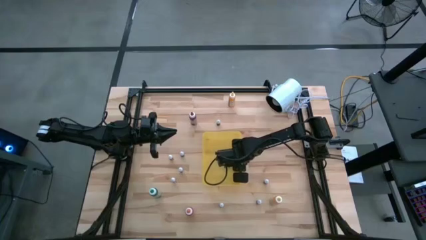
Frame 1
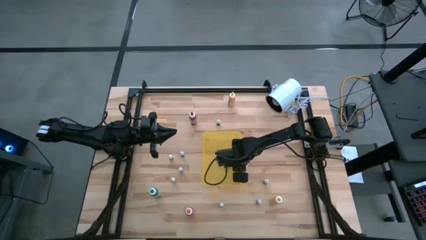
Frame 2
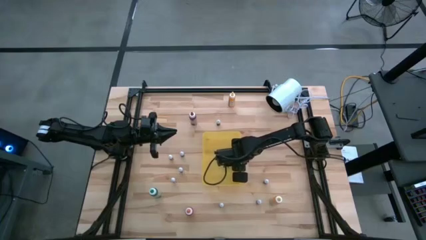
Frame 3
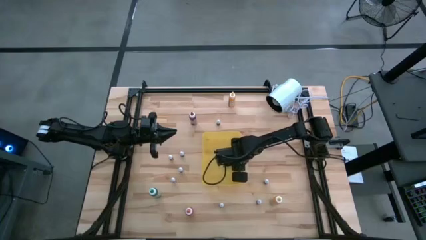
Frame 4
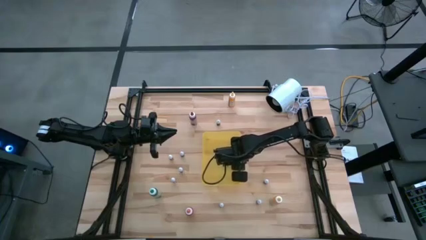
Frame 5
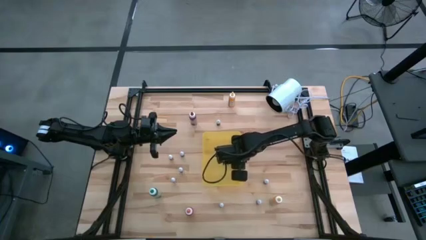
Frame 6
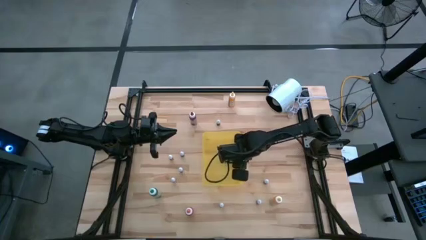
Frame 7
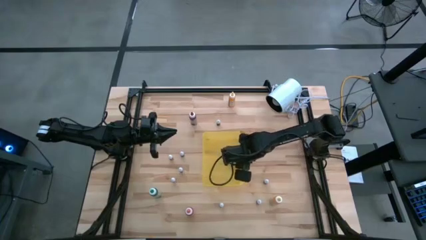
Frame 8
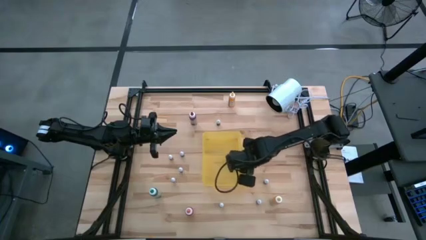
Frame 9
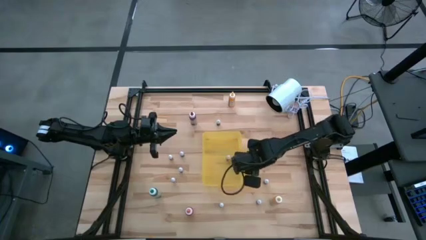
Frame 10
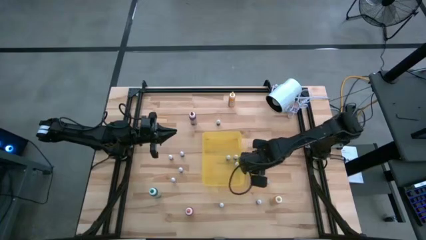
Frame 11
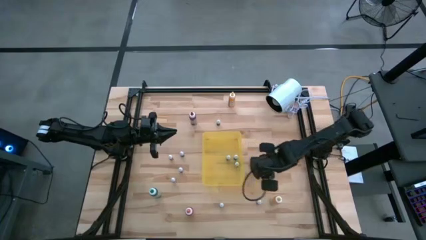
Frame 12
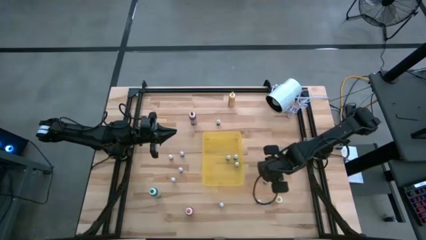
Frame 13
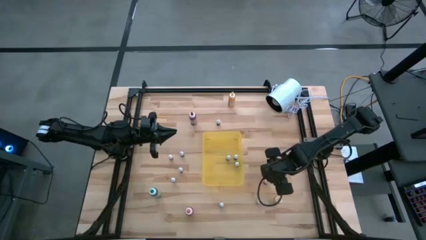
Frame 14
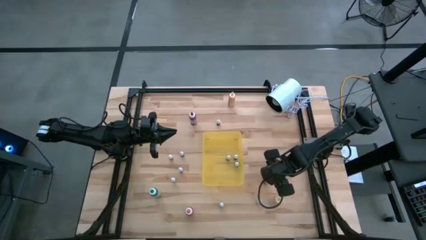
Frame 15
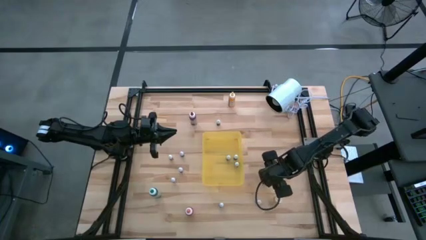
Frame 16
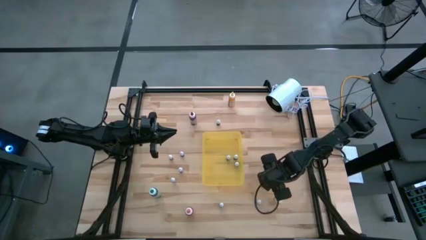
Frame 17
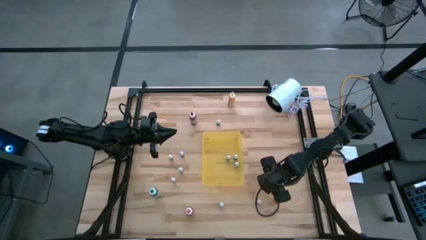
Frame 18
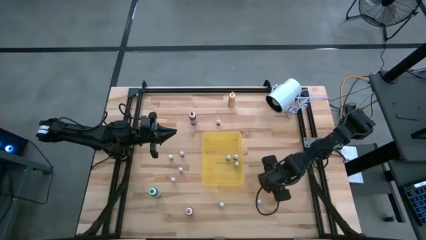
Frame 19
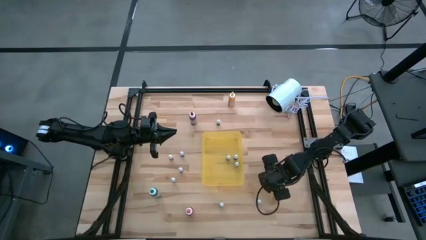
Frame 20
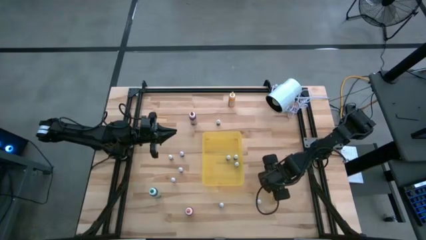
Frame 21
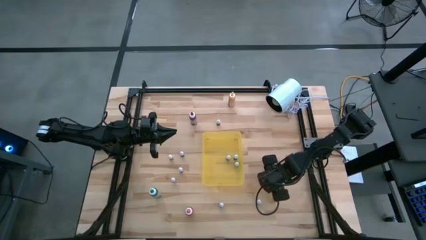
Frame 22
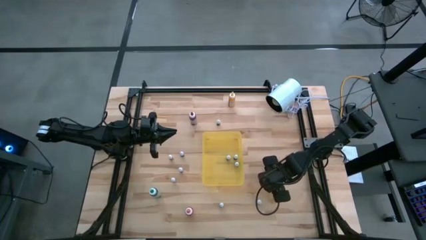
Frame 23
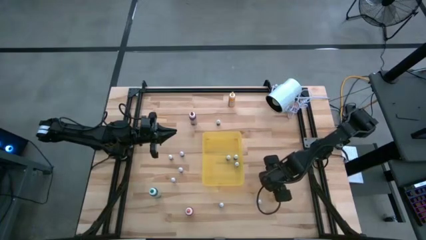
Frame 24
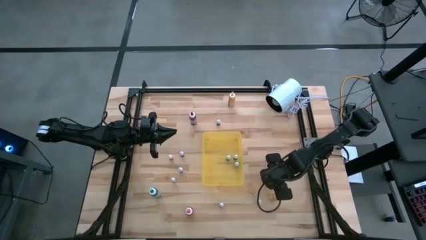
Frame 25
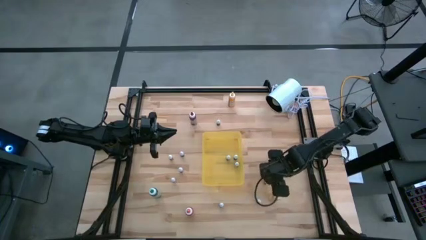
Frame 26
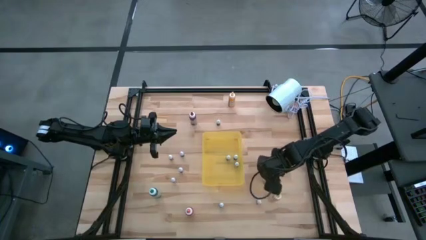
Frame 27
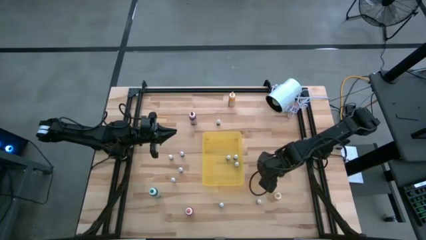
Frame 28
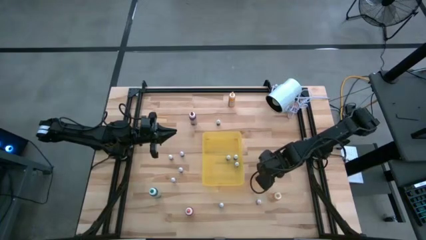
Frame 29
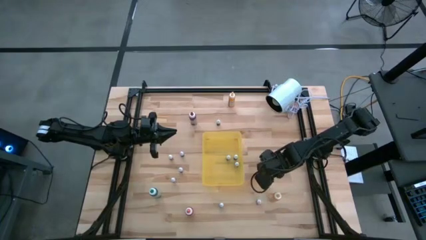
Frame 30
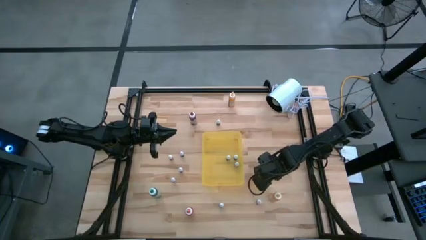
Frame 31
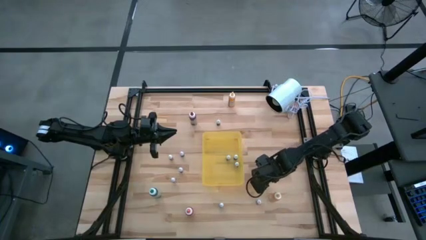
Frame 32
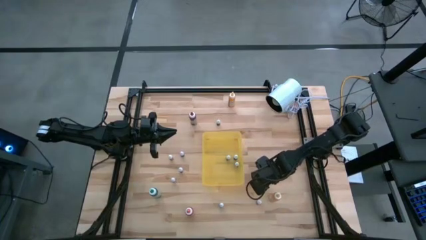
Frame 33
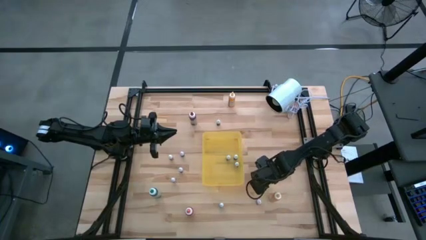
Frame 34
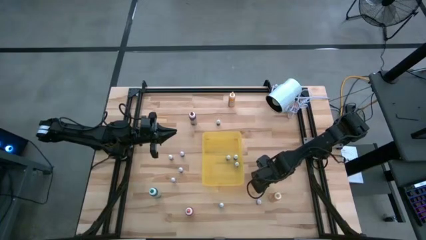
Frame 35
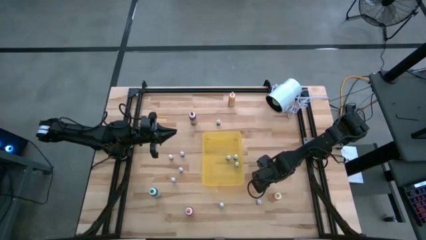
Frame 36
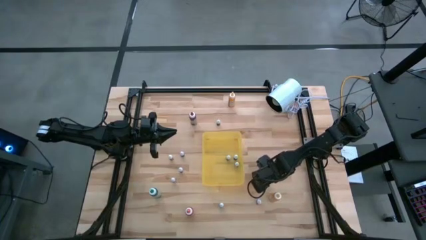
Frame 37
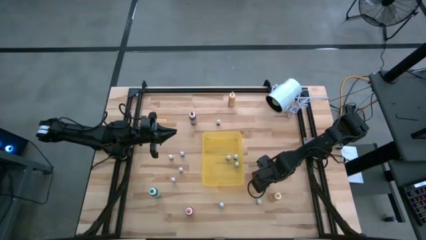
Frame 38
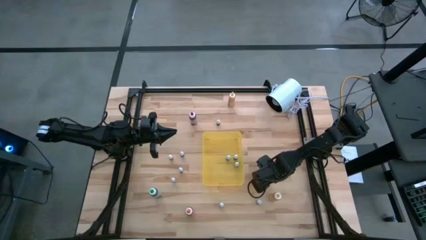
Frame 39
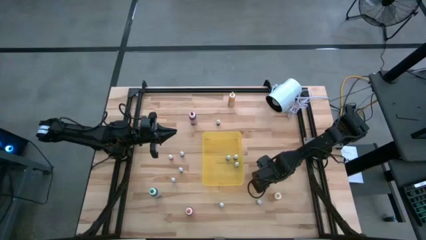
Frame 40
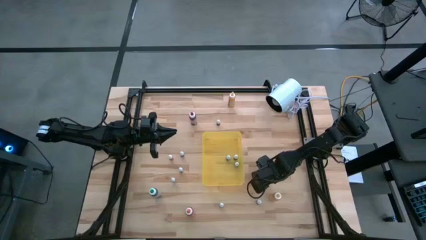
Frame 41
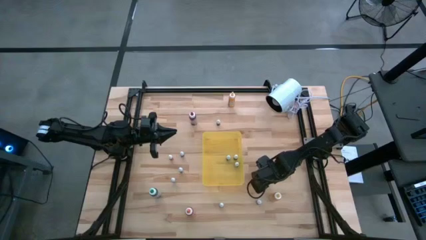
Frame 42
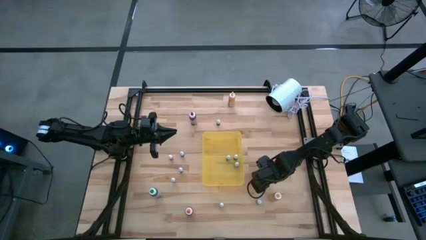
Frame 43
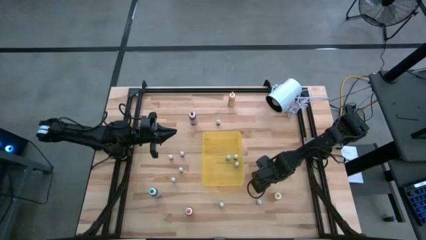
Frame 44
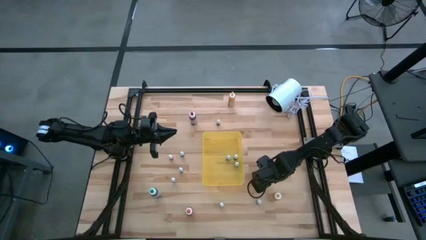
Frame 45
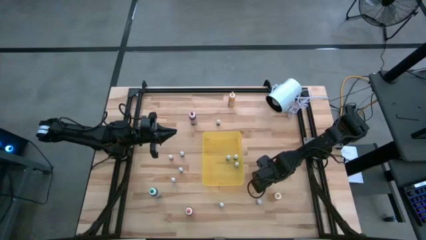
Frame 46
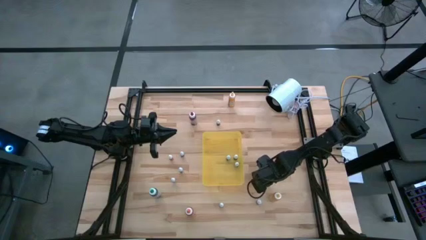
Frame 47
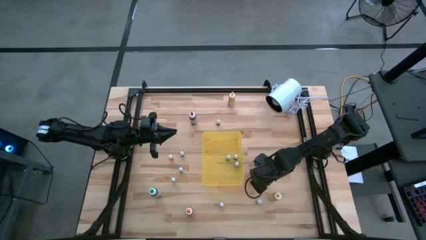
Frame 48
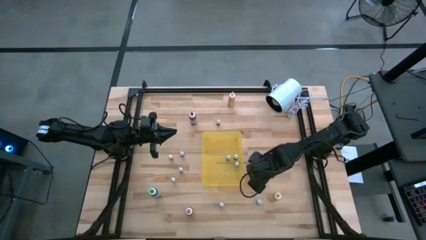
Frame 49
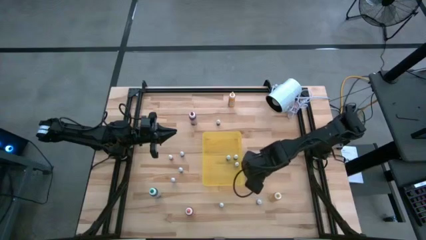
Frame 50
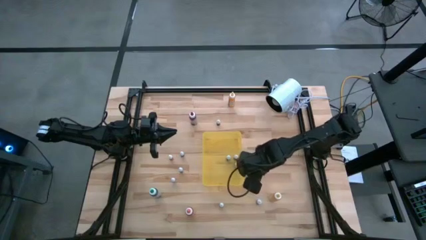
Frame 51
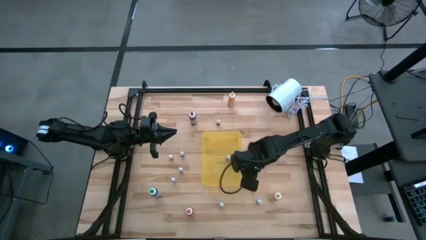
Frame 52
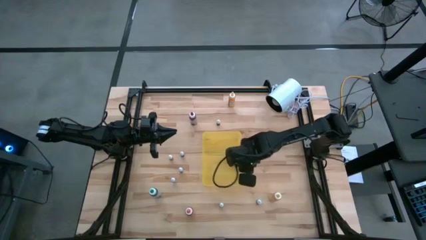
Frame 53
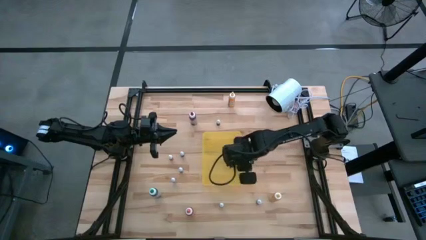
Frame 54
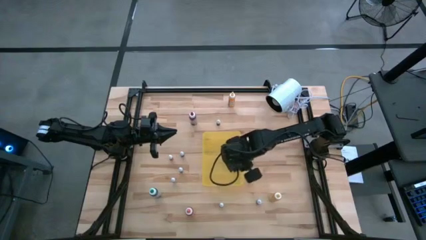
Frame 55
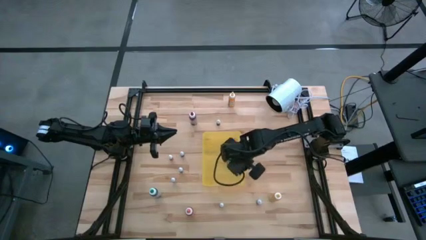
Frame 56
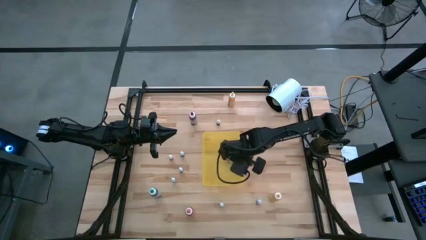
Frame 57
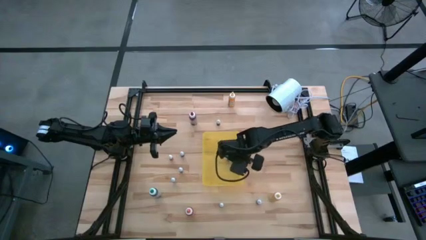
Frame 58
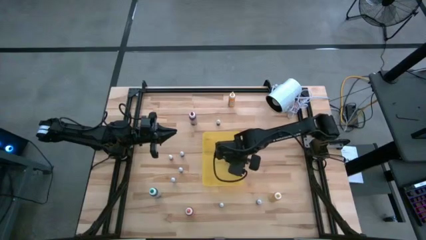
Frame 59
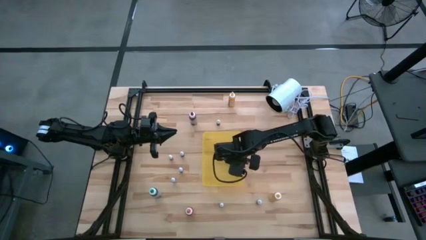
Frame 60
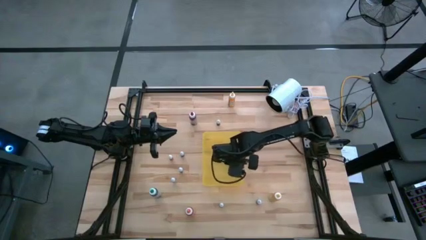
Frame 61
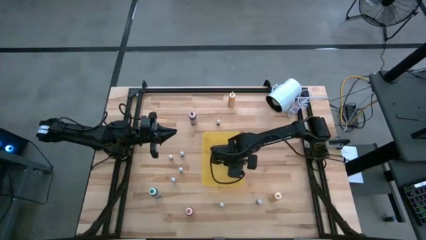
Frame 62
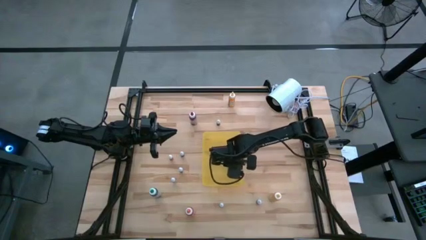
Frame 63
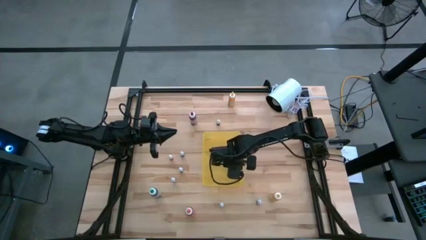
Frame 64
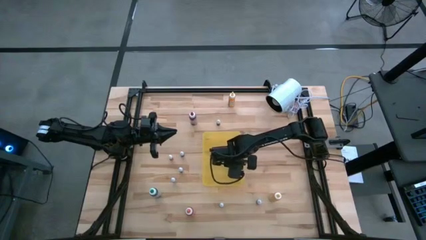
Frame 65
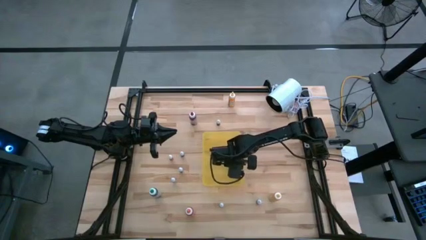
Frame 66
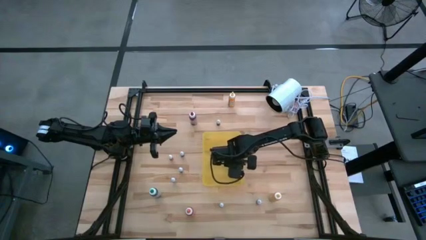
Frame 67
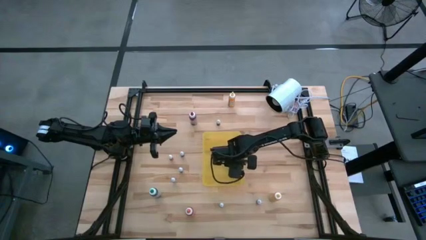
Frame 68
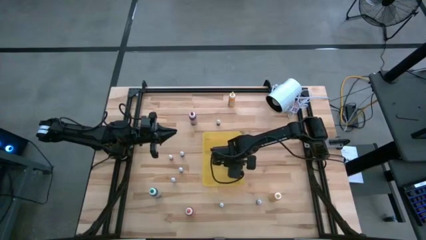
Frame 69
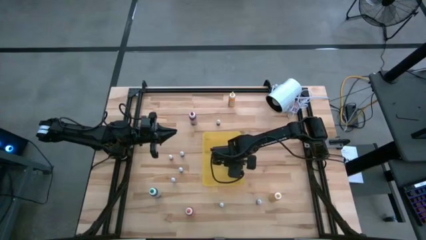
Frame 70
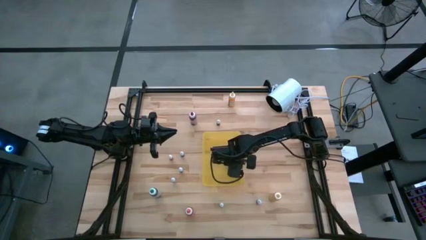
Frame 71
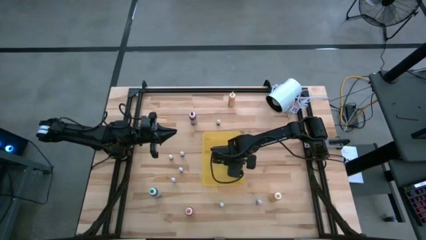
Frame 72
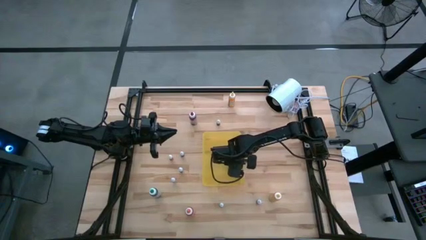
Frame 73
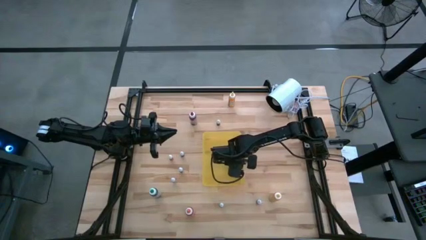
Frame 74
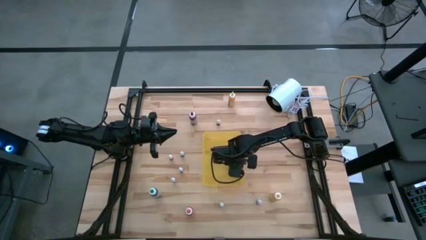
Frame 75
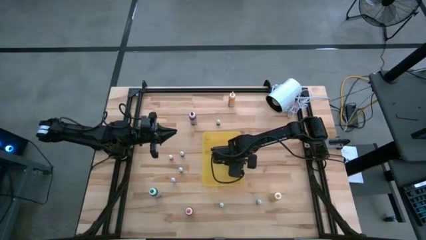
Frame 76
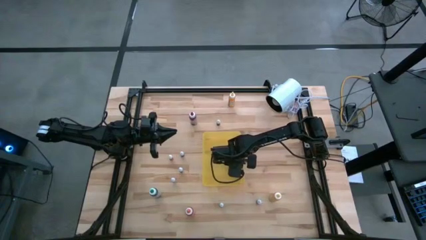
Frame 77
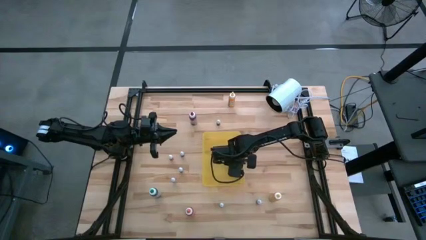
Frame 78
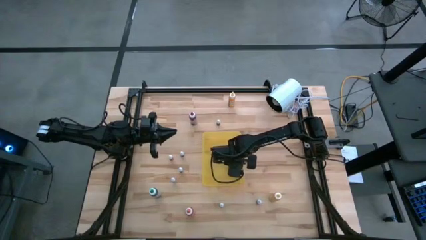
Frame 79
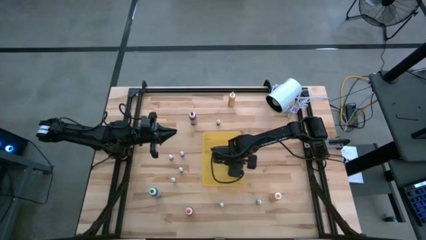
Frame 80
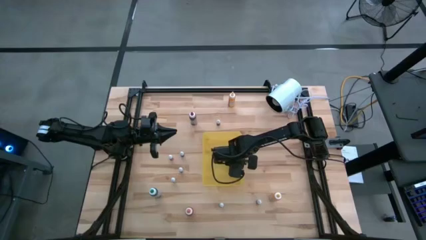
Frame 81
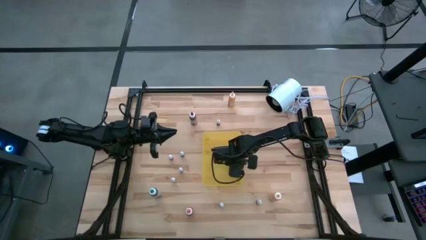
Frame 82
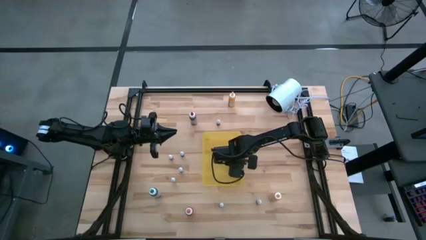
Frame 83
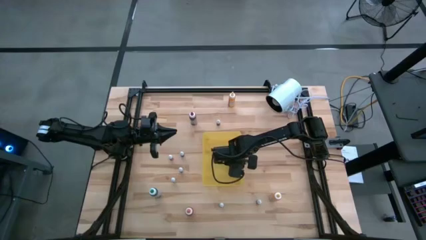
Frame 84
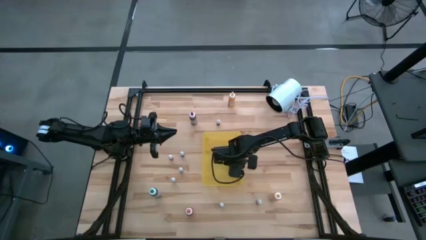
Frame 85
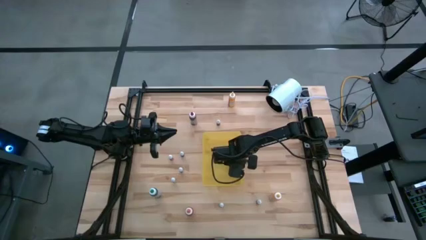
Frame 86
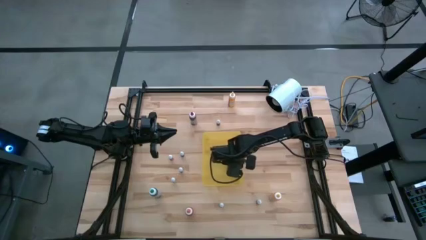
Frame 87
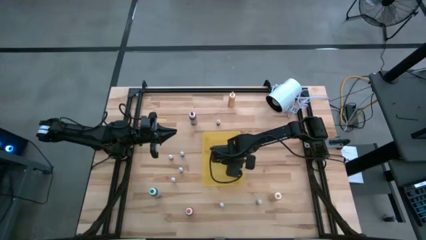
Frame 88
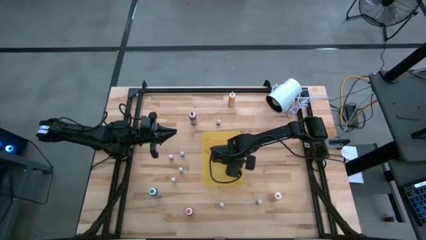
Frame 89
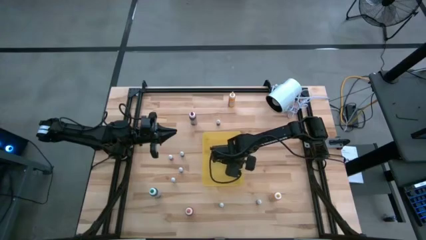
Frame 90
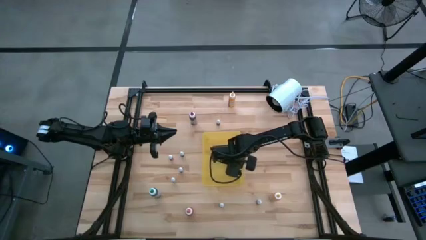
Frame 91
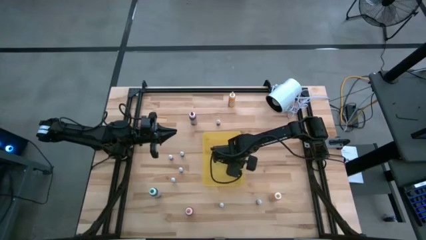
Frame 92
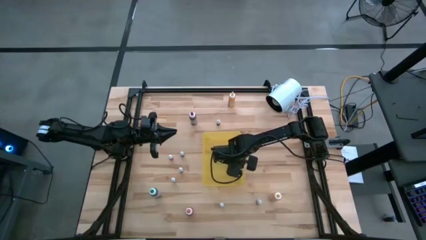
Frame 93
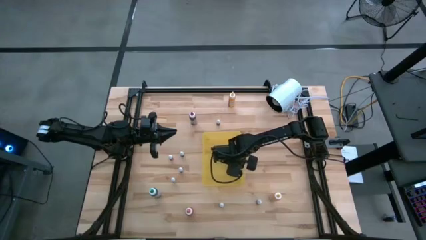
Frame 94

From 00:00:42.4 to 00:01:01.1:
Task: Pick & Place food coloring
Put the small black food coloring bottle into the yellow bin
